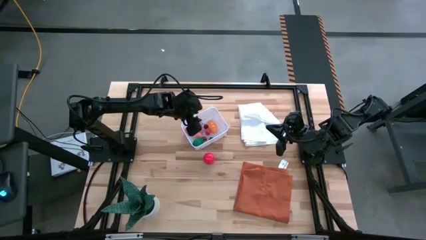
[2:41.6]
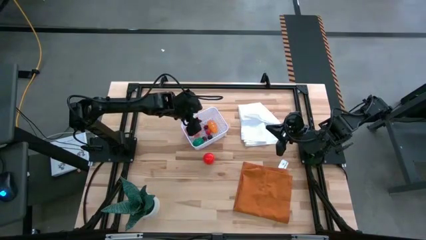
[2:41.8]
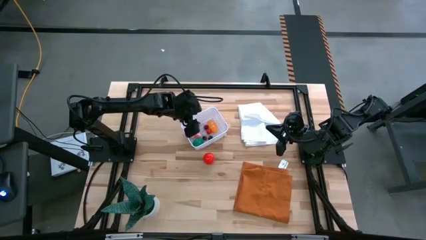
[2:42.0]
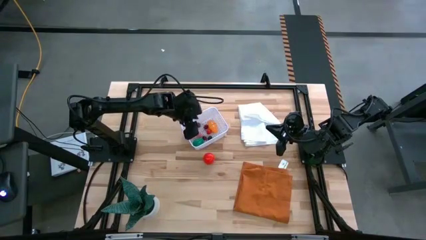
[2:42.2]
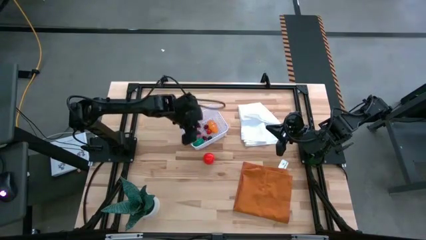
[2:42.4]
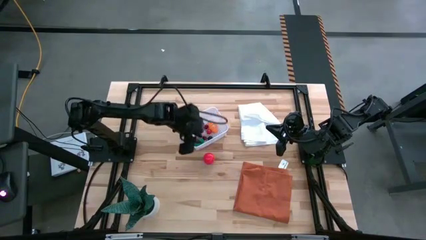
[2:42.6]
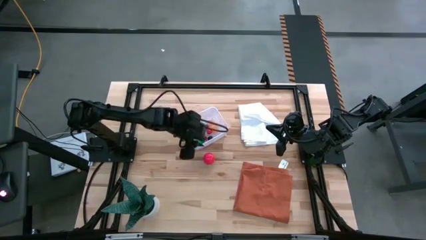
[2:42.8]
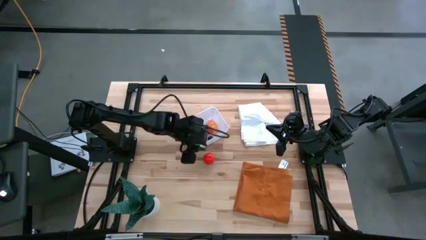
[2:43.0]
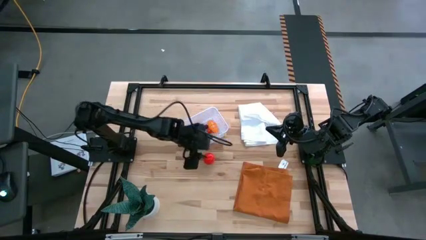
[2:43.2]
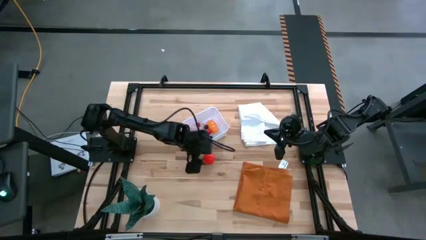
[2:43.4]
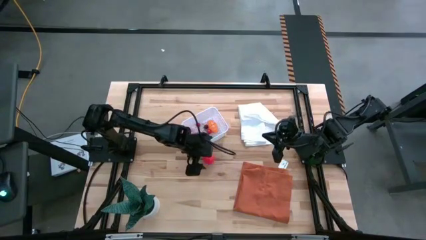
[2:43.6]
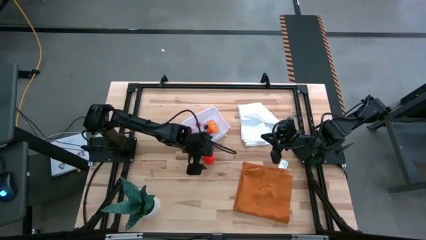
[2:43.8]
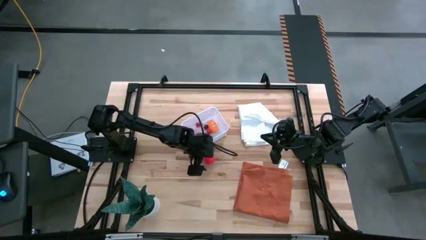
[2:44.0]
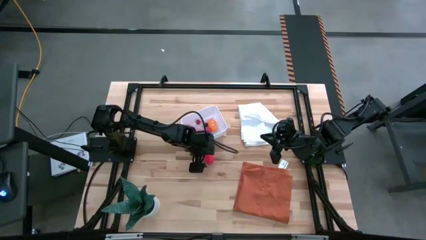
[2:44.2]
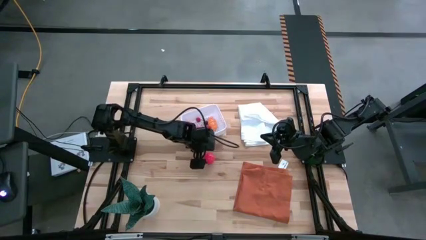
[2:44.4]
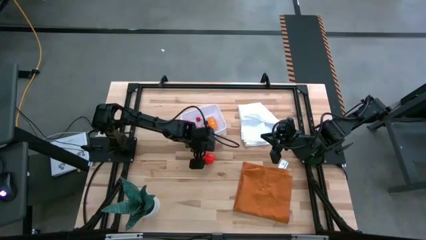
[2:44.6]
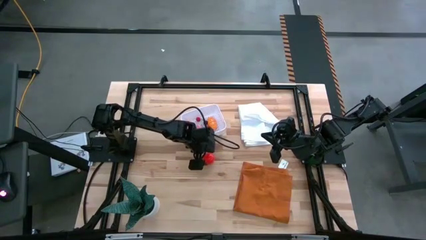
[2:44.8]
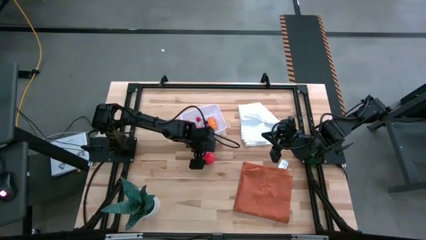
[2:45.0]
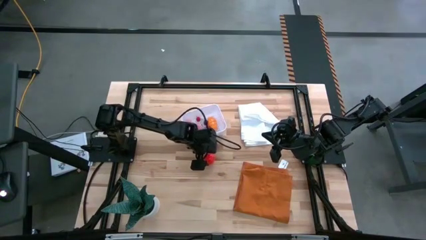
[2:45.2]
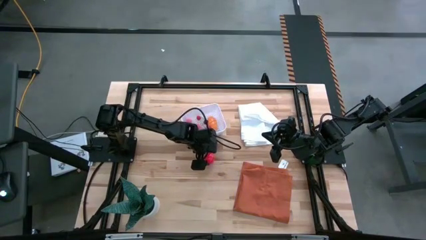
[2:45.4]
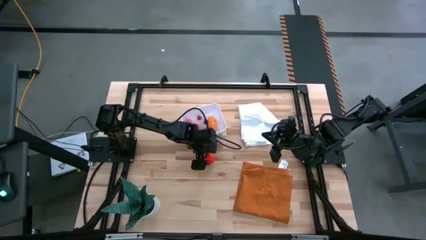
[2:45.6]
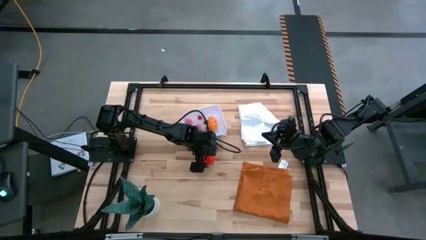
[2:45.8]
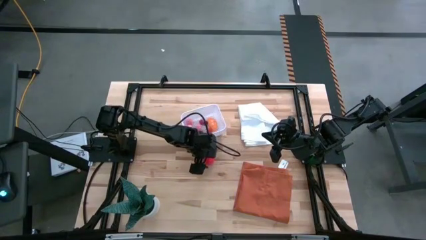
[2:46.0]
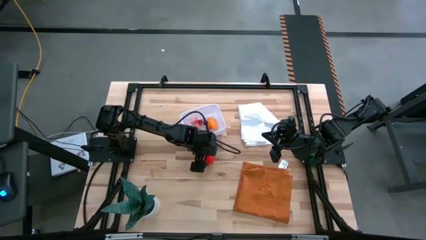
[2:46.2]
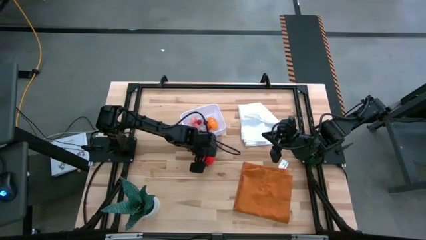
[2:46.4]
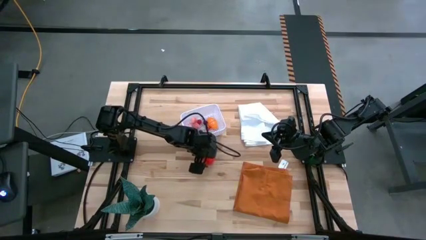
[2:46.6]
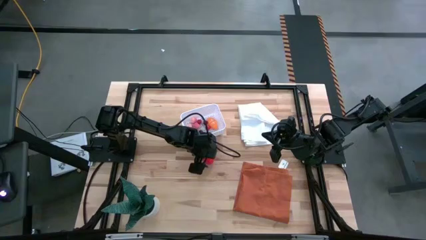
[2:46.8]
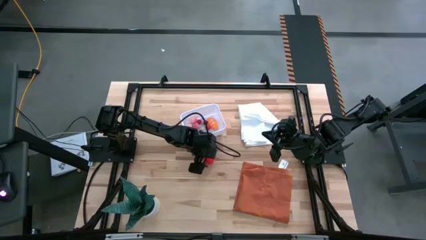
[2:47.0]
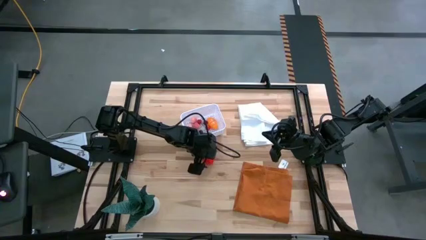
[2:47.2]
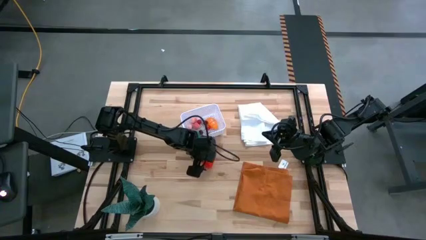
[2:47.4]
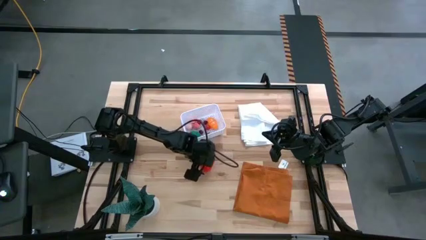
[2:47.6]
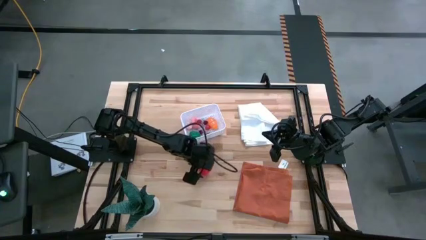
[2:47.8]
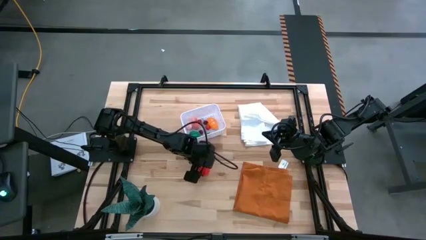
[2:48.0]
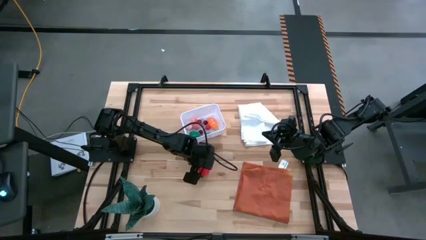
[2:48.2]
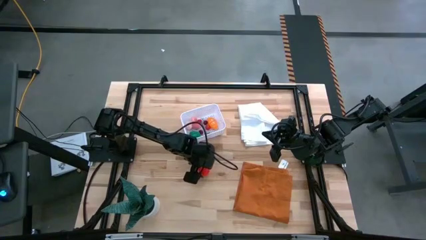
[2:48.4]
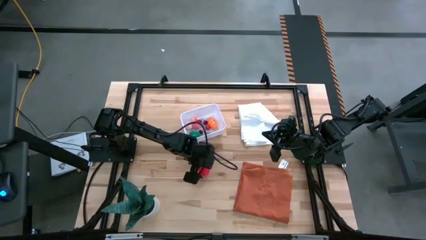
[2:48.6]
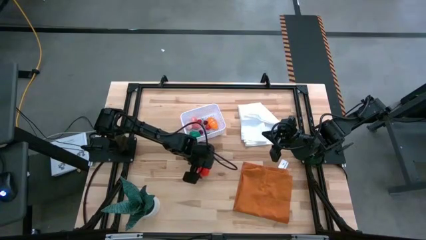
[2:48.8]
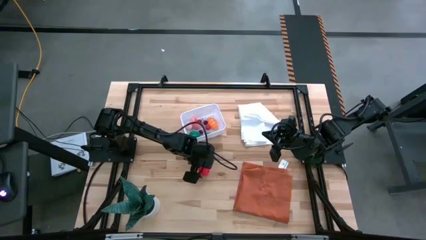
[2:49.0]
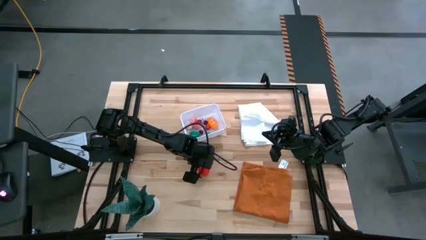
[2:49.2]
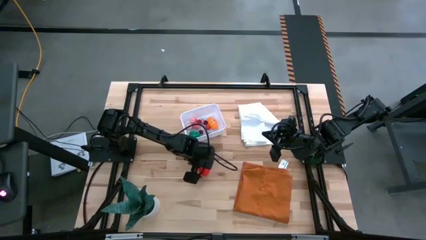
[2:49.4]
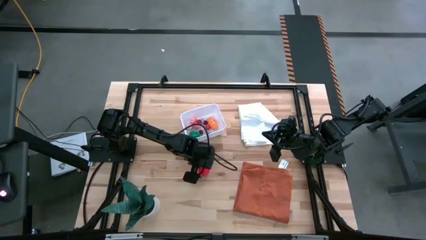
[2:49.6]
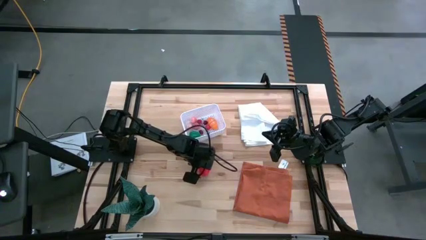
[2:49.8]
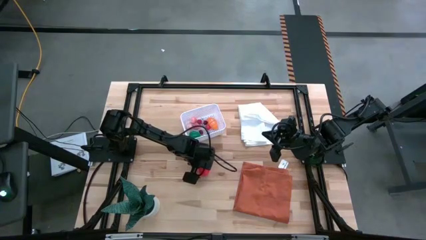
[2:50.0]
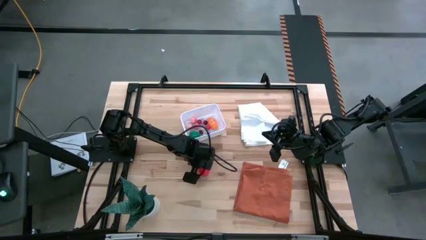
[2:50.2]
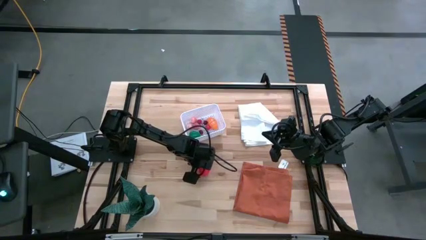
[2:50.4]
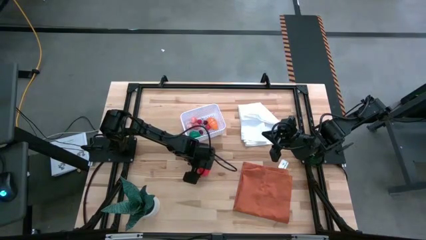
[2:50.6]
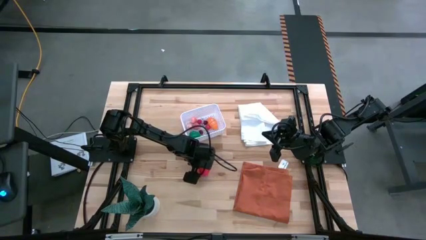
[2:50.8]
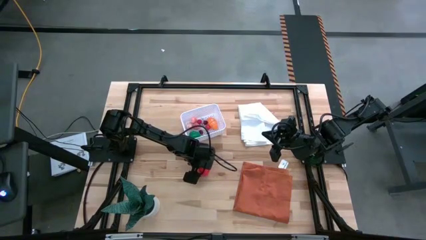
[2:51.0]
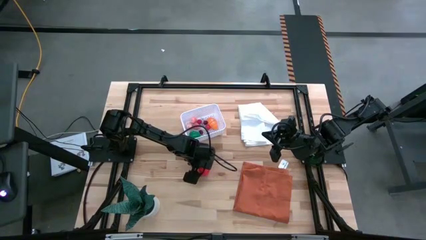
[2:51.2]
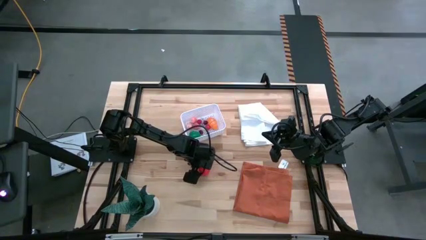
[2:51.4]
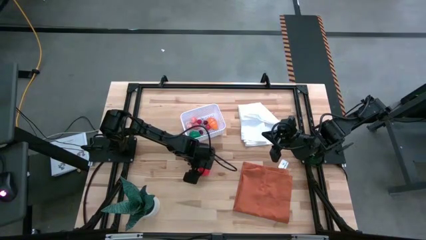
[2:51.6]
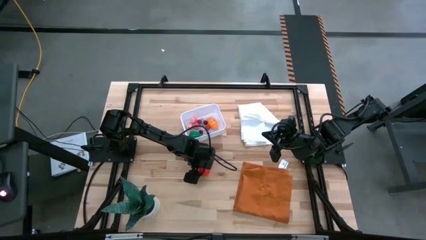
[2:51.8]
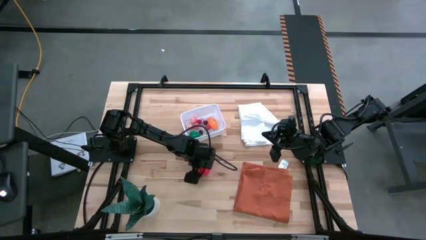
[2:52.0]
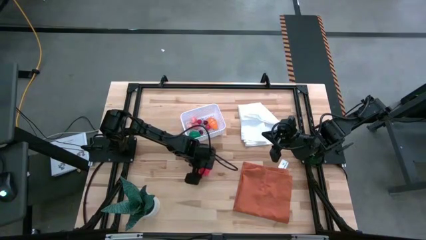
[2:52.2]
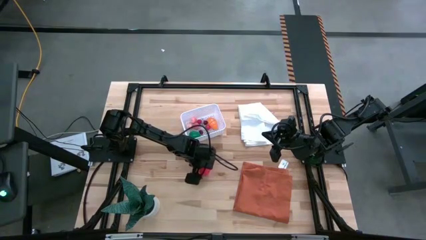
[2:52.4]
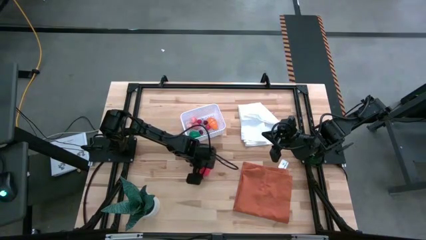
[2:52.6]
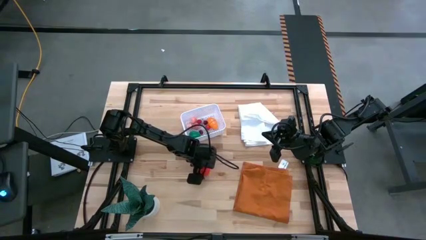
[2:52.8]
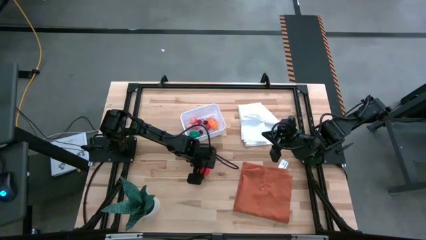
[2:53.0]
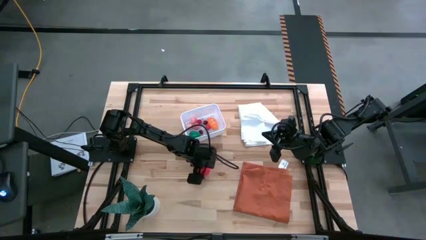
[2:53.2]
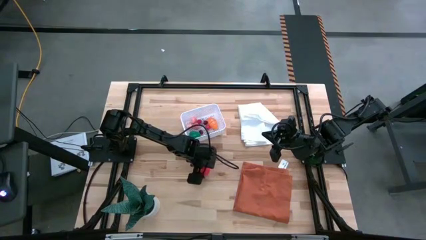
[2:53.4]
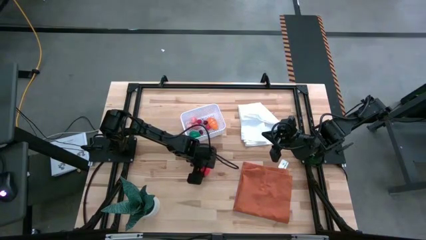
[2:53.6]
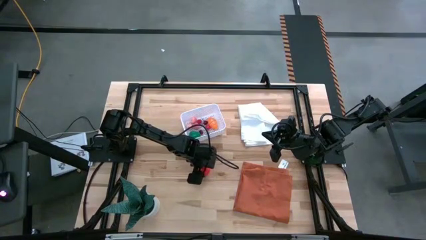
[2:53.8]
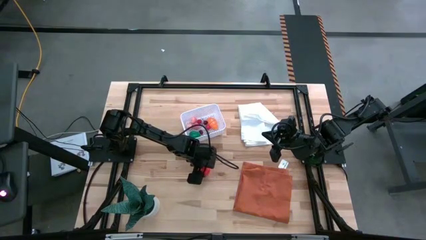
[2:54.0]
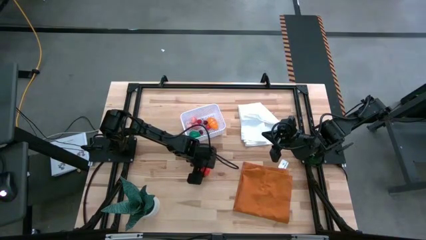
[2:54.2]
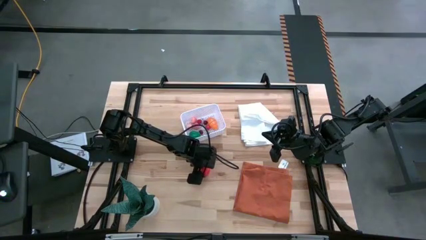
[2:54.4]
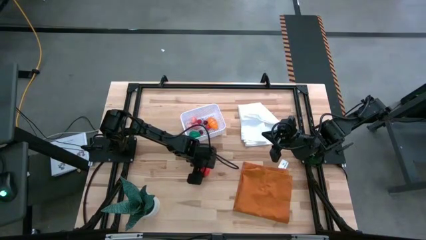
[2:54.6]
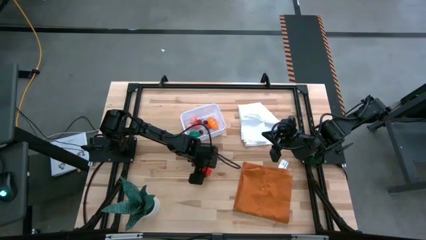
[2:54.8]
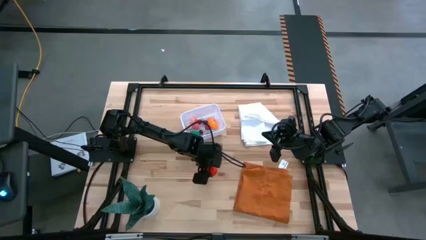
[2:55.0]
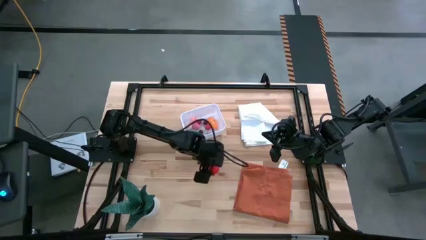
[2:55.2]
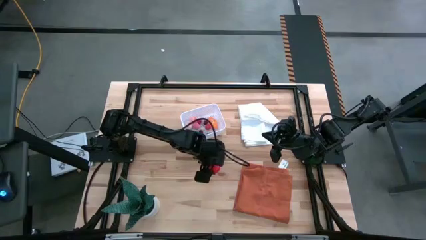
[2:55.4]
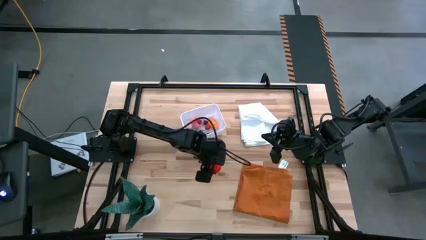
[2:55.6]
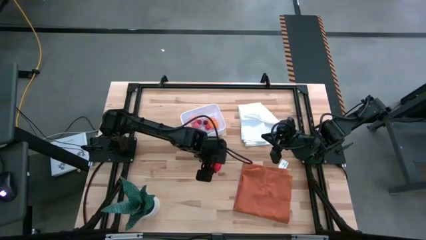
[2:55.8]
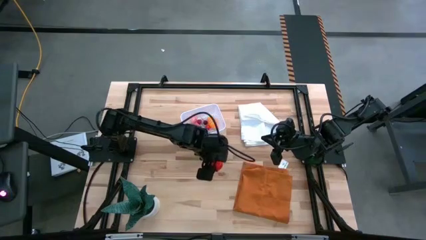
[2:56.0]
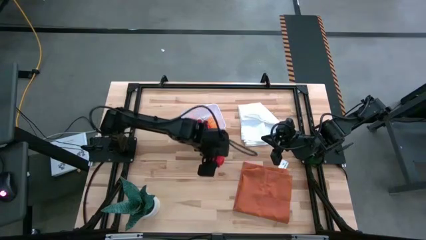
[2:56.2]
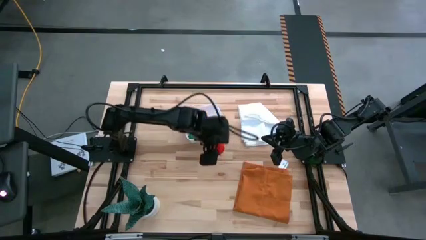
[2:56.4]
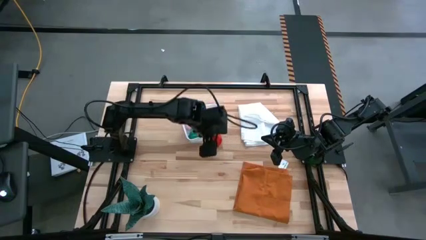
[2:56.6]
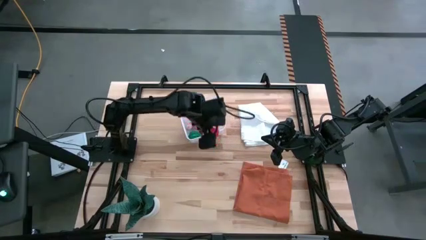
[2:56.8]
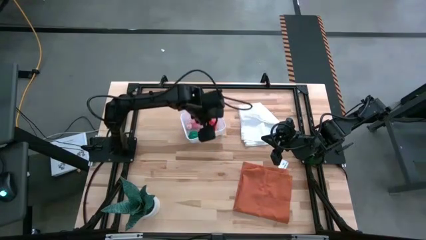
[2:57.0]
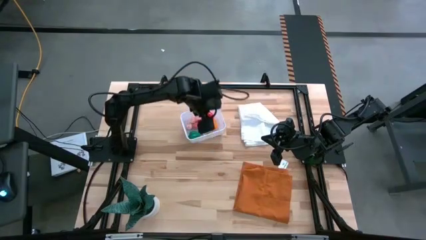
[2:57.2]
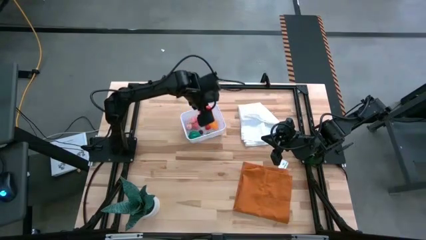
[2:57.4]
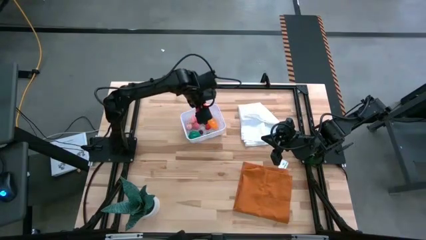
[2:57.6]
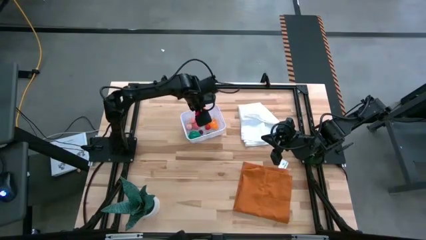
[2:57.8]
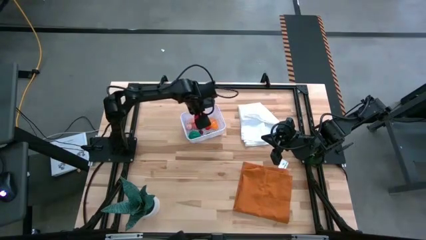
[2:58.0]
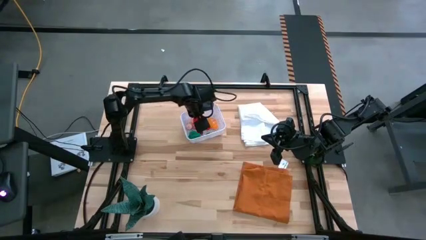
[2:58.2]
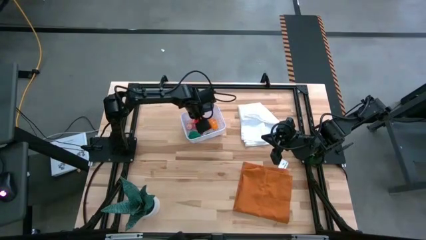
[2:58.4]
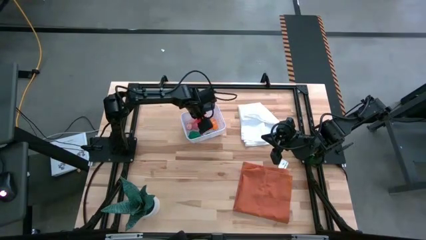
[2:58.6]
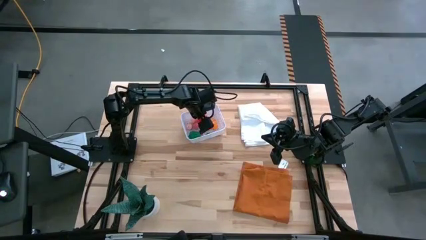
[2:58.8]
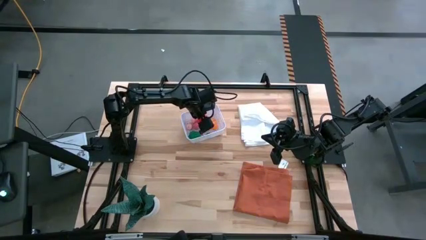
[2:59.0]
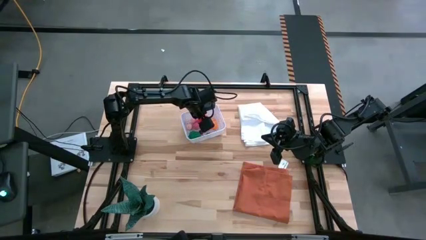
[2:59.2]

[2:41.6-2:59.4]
Task: Pick and placing Produce into tupperware
Put the tomato in the basket
